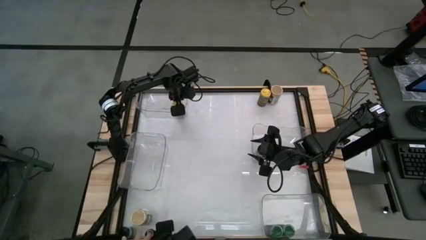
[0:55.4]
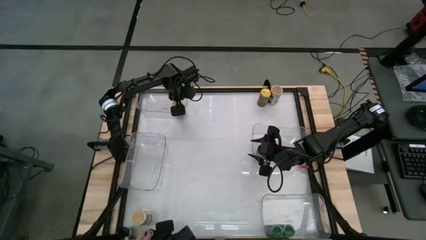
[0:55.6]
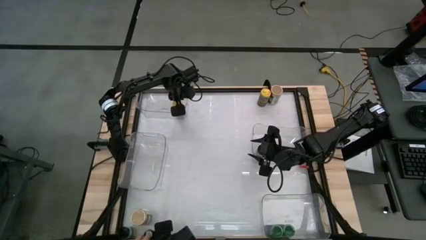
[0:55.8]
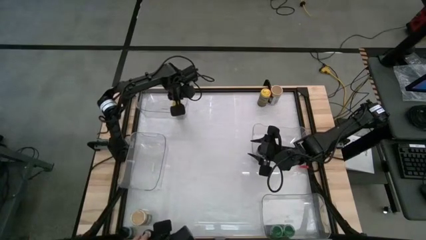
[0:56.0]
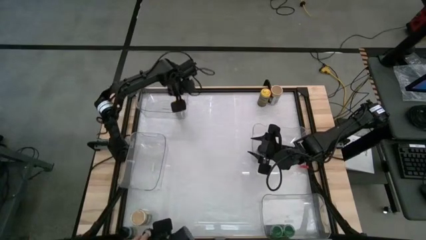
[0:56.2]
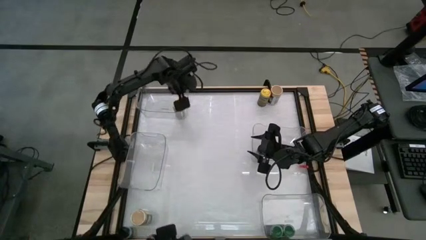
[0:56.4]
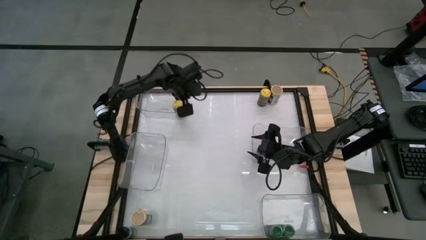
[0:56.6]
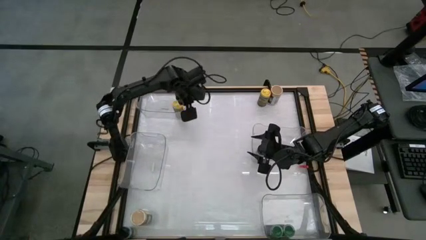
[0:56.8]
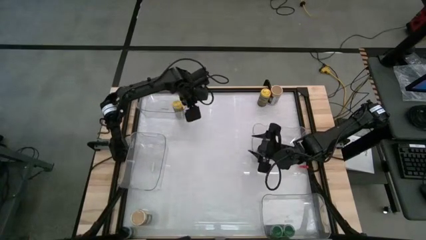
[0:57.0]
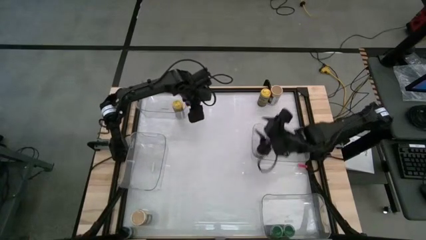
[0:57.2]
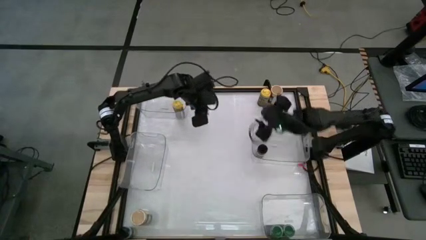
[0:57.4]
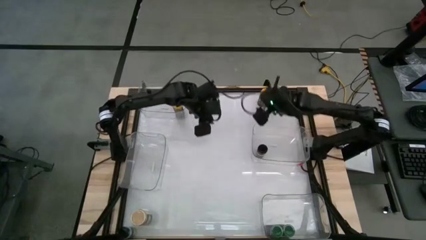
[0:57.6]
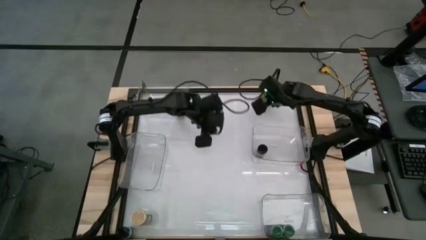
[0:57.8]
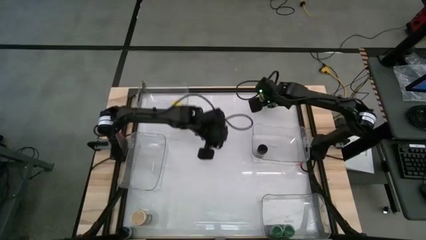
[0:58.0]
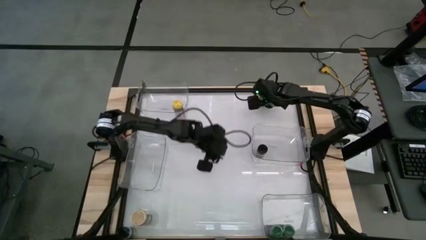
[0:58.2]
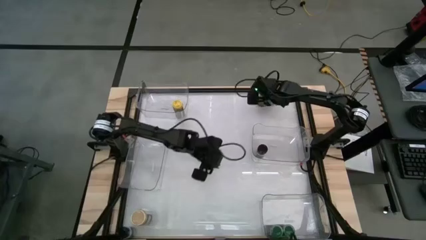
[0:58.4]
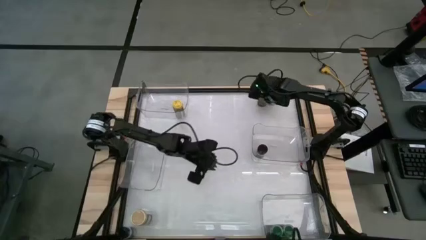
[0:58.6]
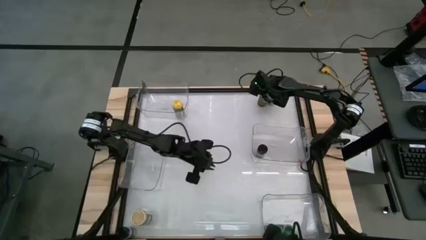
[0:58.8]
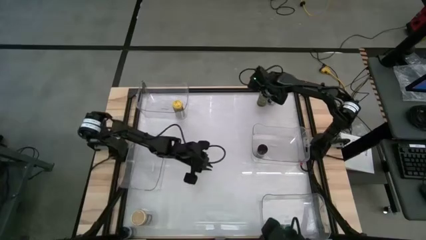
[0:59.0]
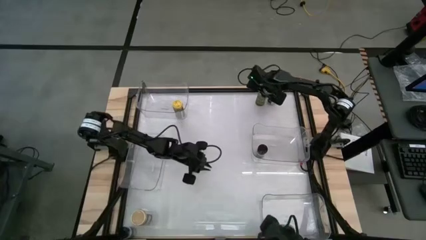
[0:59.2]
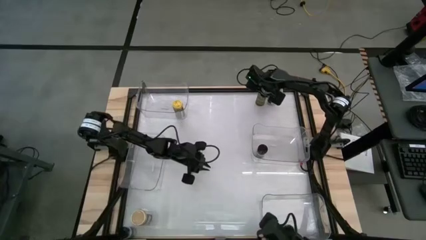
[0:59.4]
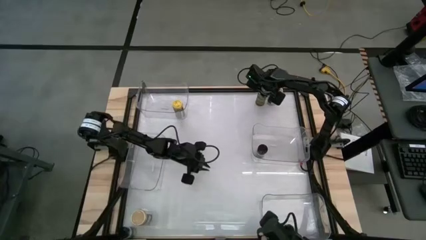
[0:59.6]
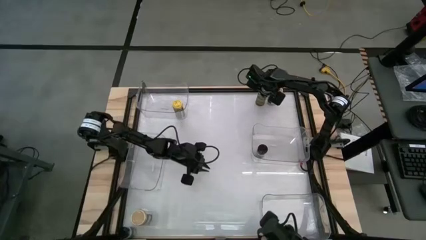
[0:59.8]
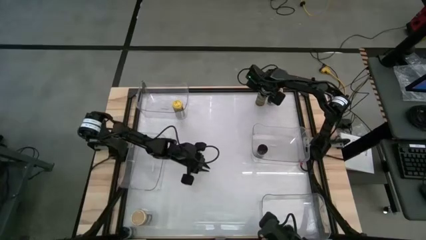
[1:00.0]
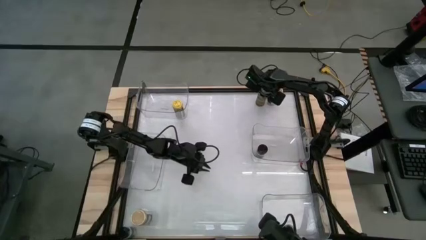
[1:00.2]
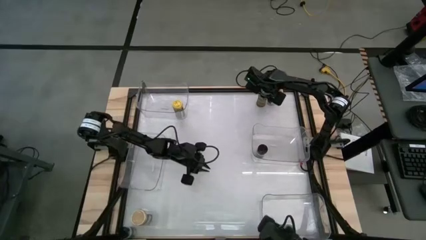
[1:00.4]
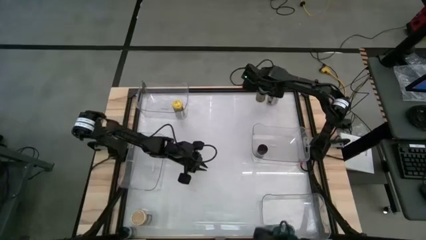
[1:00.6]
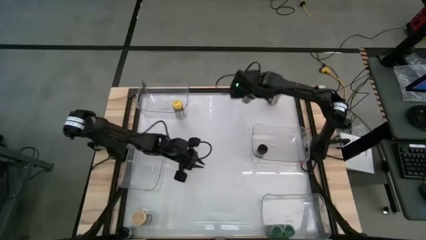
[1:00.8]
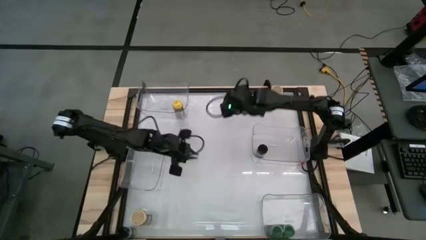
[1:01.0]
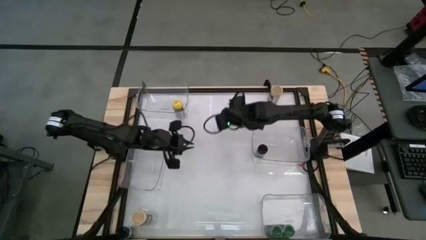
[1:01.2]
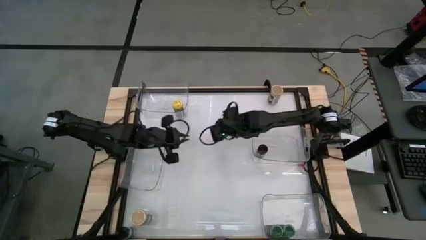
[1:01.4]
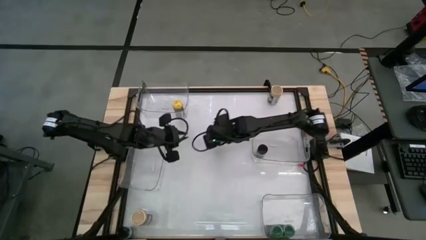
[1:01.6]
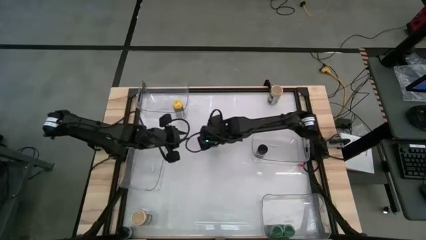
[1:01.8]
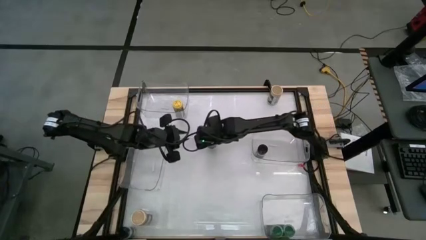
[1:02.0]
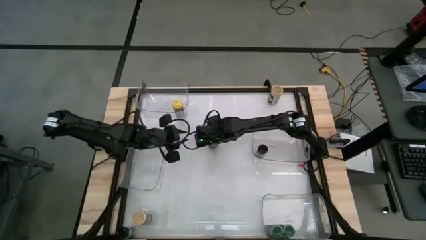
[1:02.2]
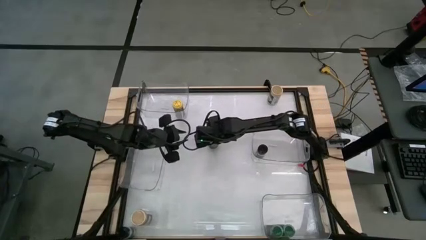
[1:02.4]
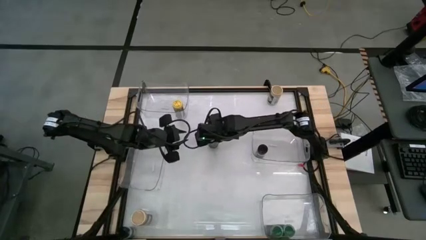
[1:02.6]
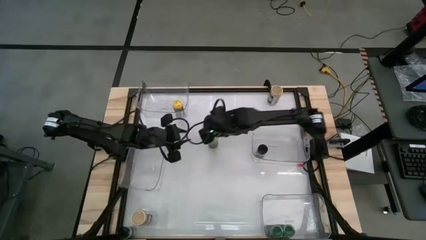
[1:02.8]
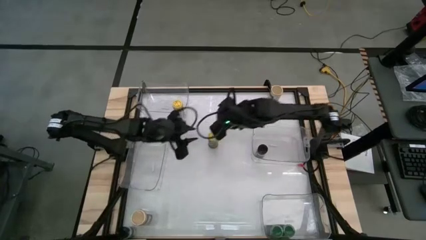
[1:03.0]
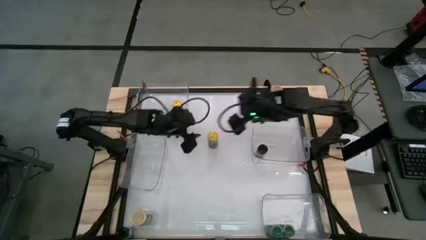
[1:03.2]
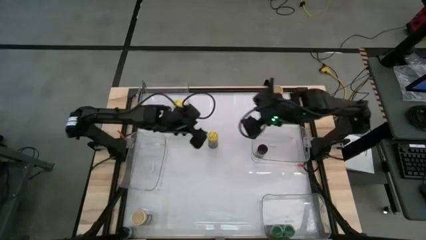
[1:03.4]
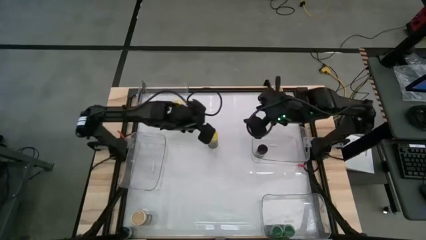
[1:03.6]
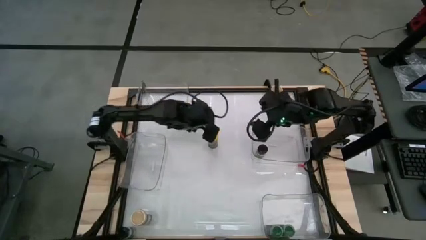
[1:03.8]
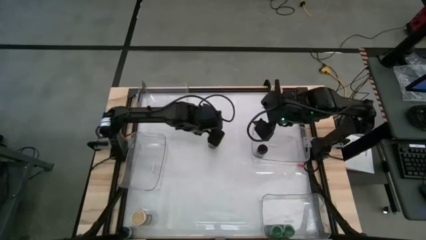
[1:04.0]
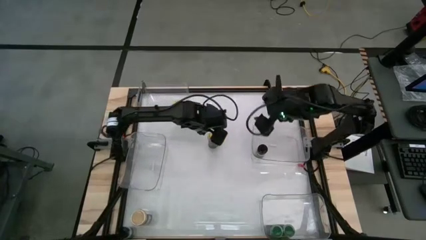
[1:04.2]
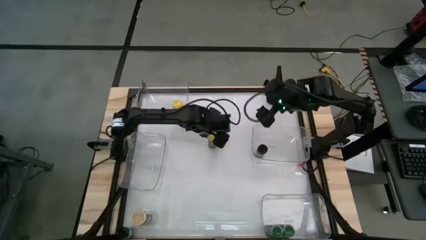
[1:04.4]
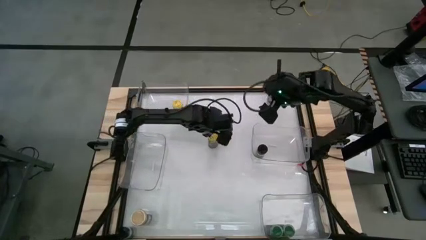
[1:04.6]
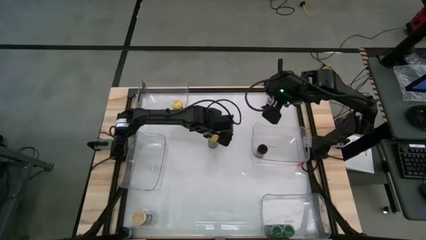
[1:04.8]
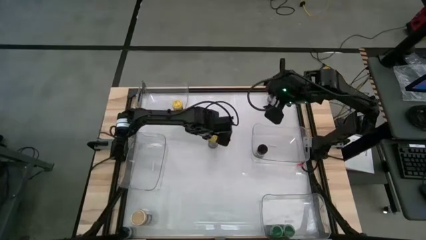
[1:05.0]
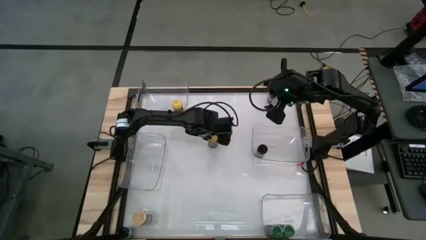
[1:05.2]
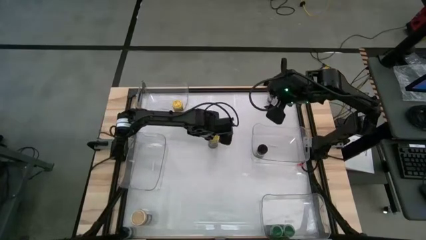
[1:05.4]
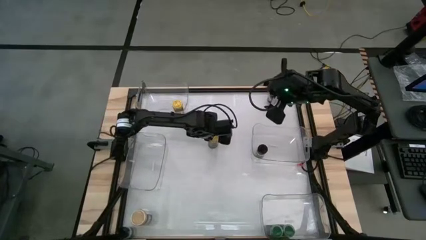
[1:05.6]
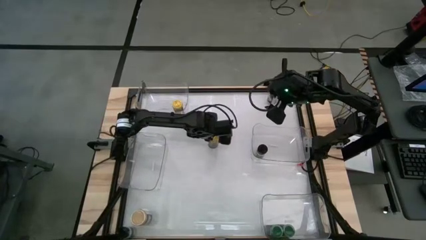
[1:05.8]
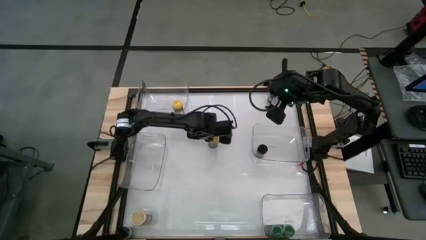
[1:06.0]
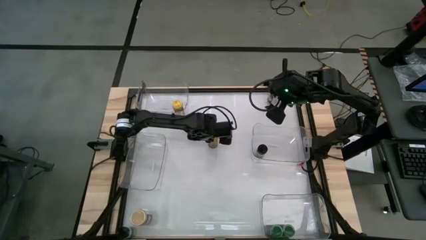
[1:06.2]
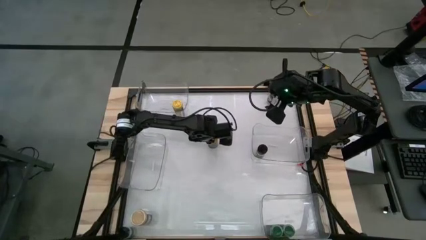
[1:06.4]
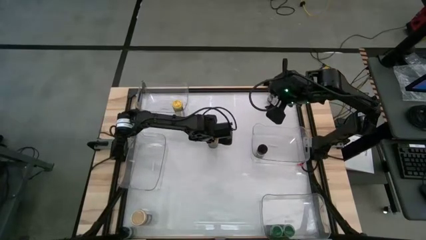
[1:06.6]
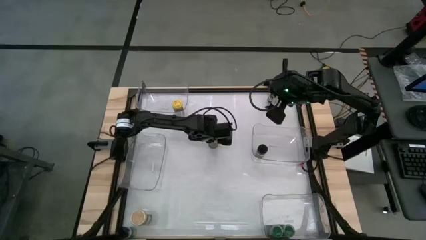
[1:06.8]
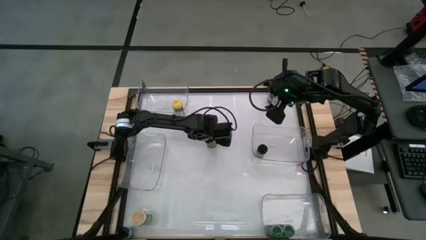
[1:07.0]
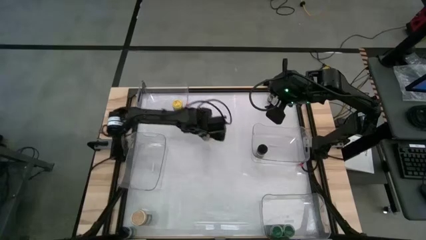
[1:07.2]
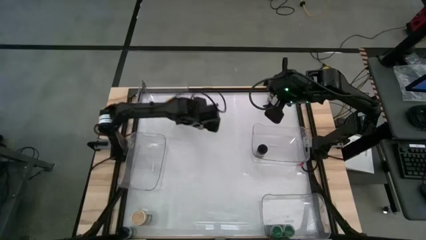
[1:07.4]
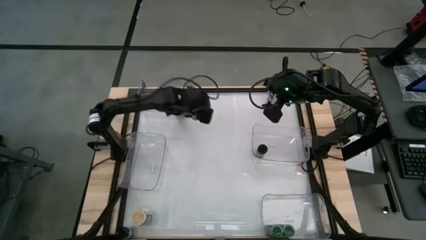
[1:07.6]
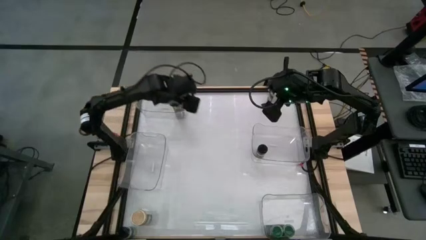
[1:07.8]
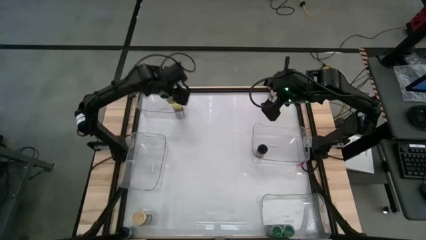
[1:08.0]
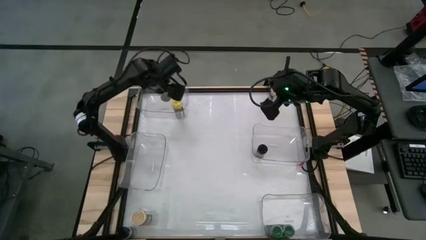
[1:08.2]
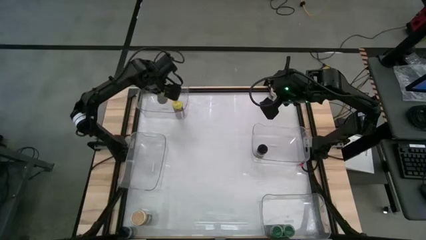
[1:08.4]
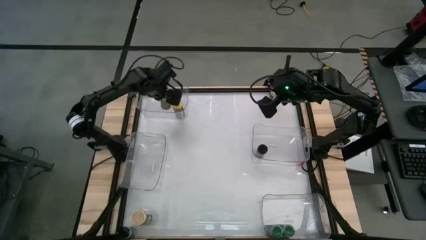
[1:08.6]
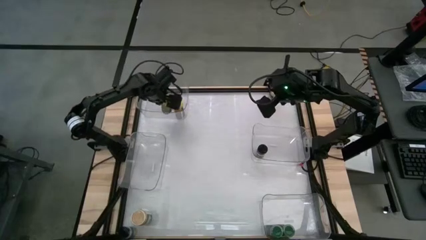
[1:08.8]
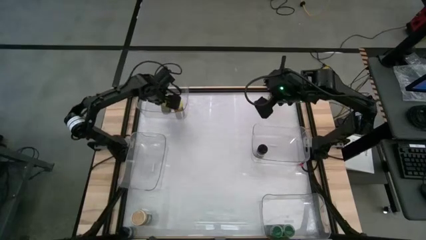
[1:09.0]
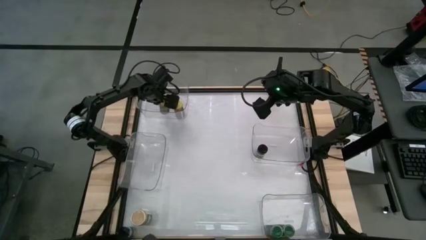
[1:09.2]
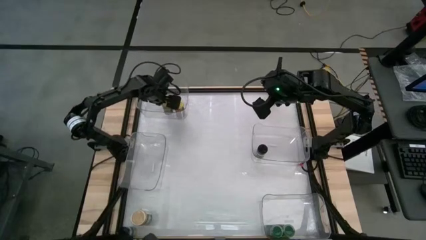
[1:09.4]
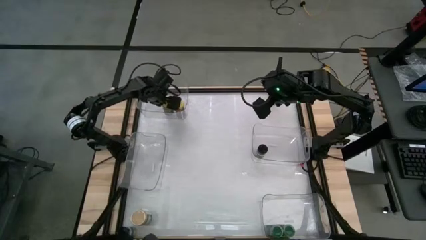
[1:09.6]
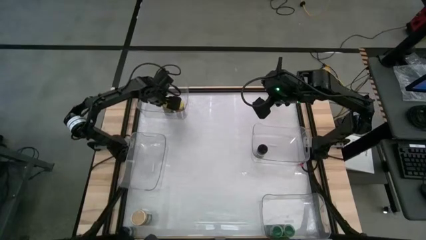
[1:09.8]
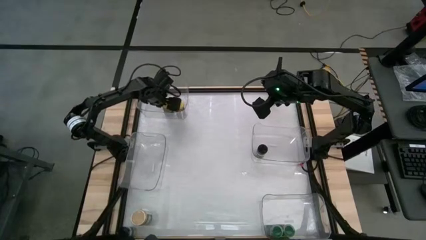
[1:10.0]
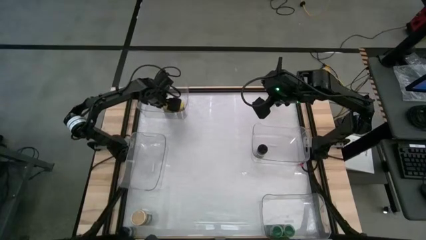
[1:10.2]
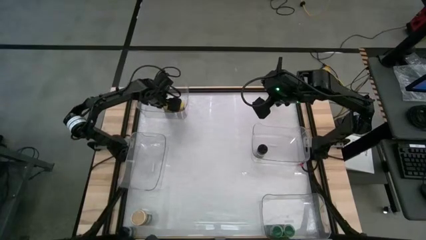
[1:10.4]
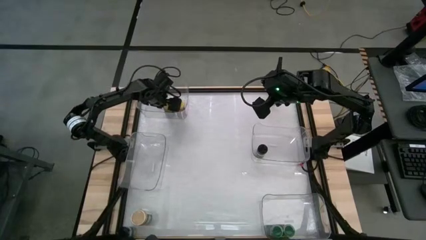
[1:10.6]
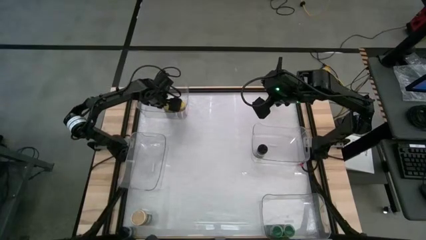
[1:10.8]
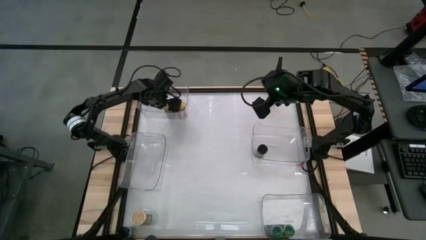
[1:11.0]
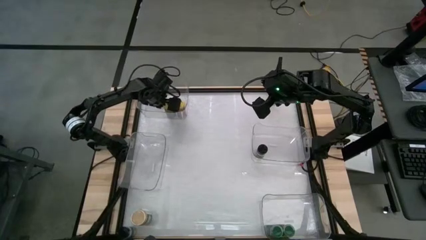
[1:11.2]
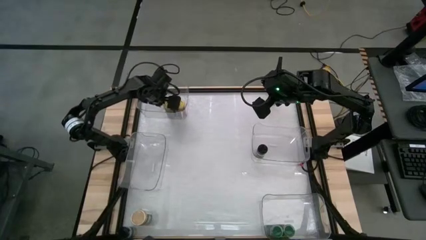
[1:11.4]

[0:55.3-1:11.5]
Task: Sort spices by type
Put the yellow seasoning bottle into the top transparent bin
